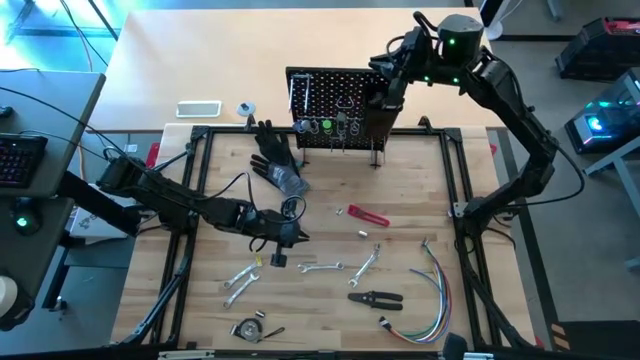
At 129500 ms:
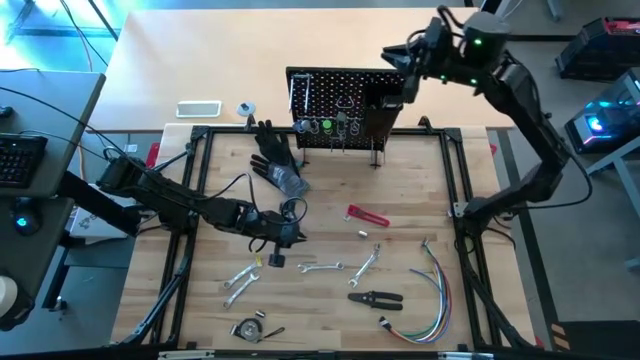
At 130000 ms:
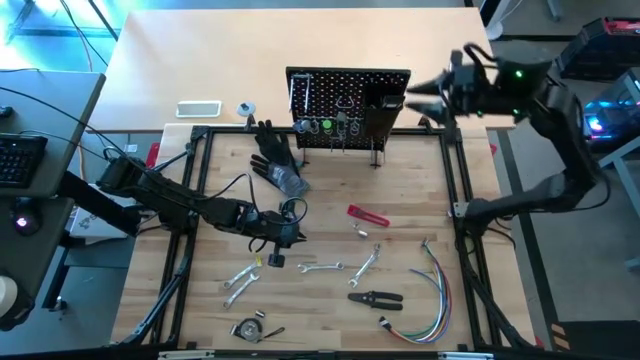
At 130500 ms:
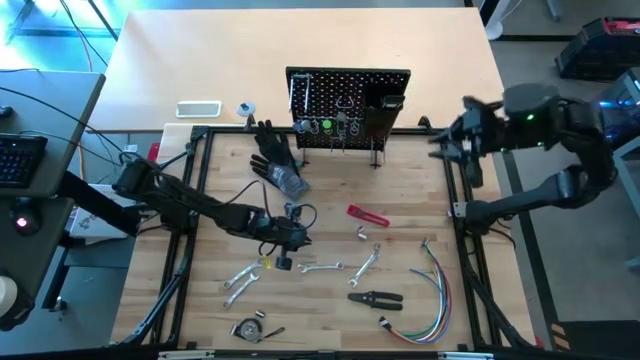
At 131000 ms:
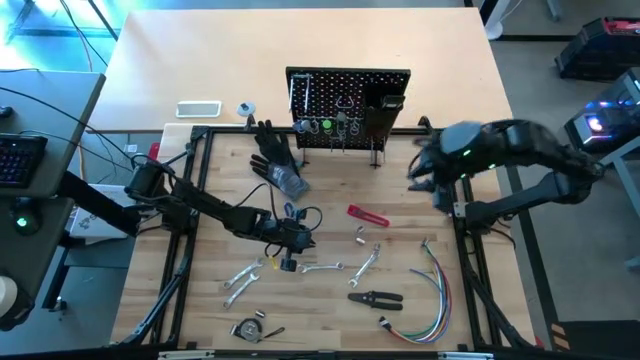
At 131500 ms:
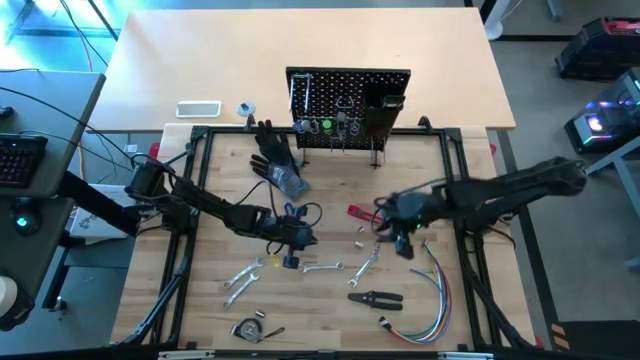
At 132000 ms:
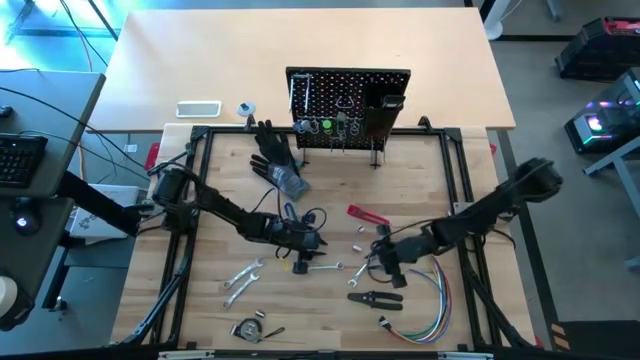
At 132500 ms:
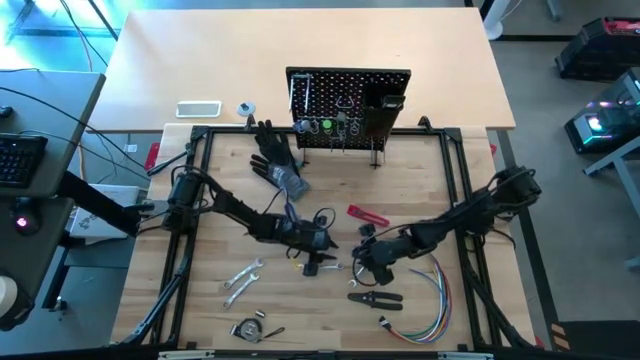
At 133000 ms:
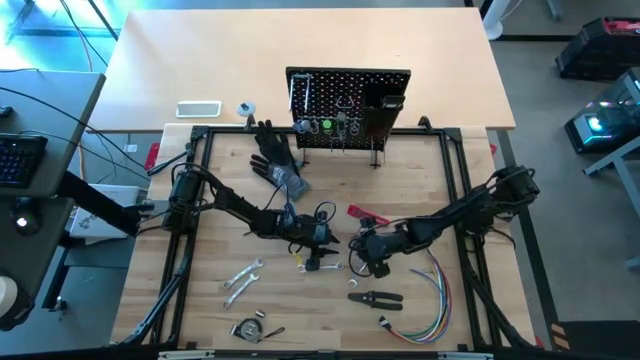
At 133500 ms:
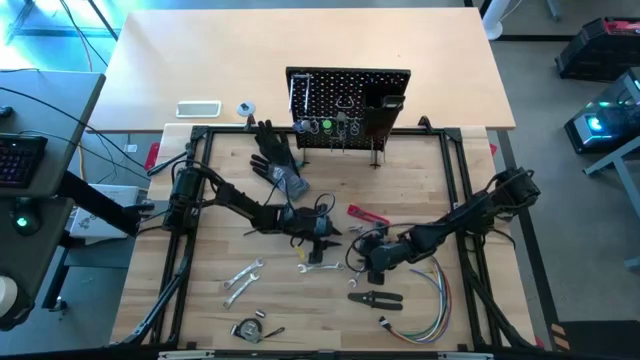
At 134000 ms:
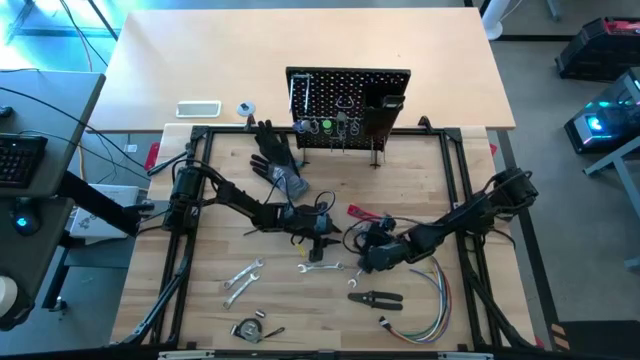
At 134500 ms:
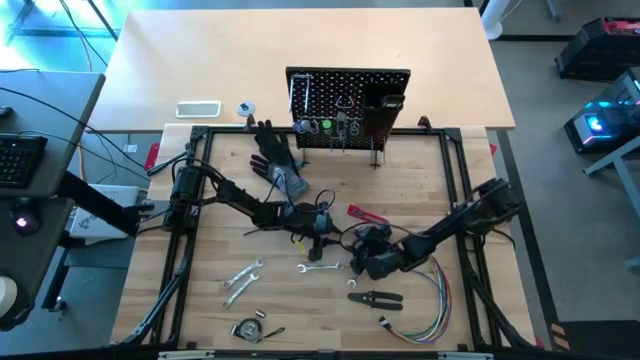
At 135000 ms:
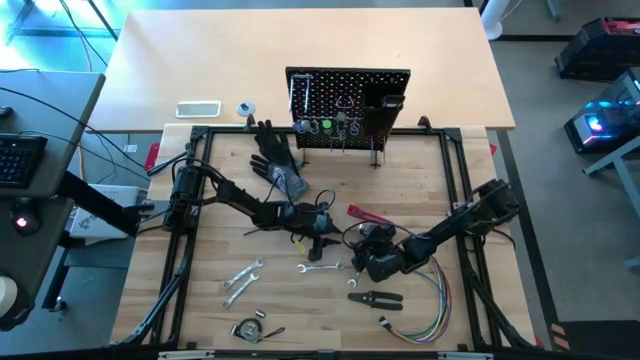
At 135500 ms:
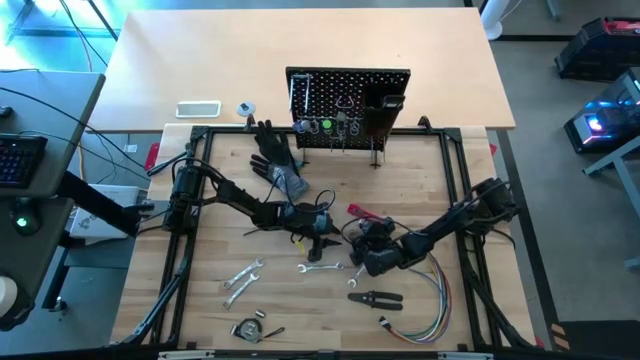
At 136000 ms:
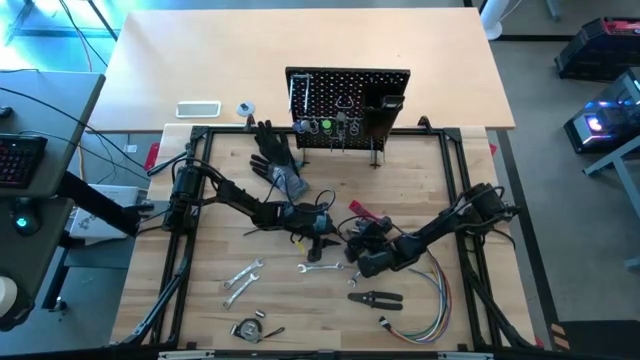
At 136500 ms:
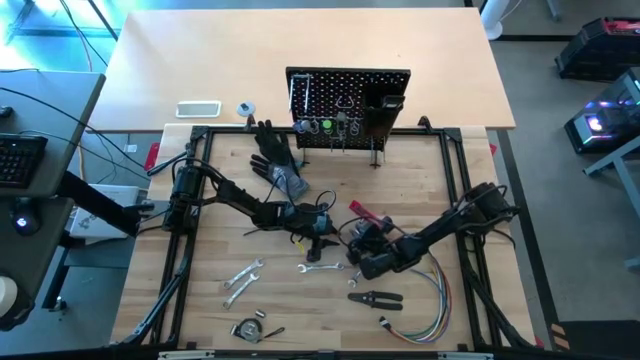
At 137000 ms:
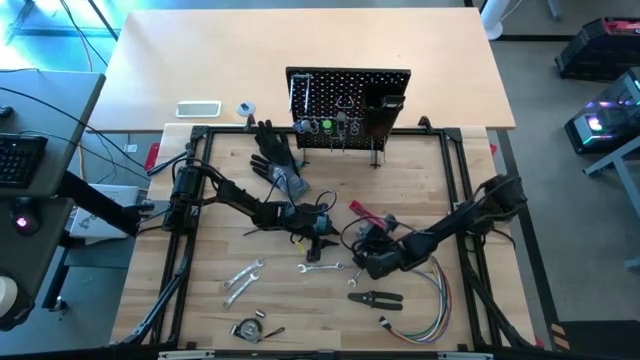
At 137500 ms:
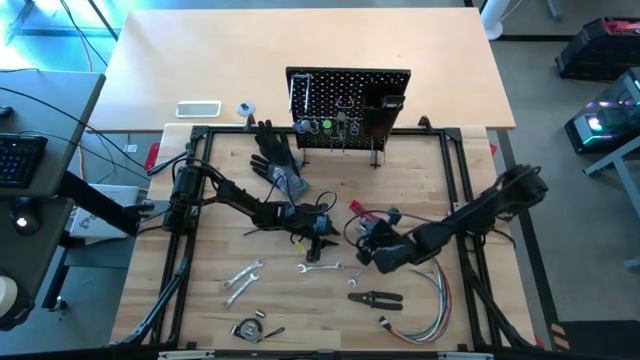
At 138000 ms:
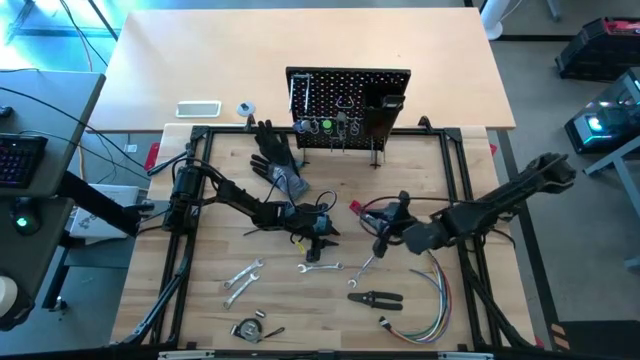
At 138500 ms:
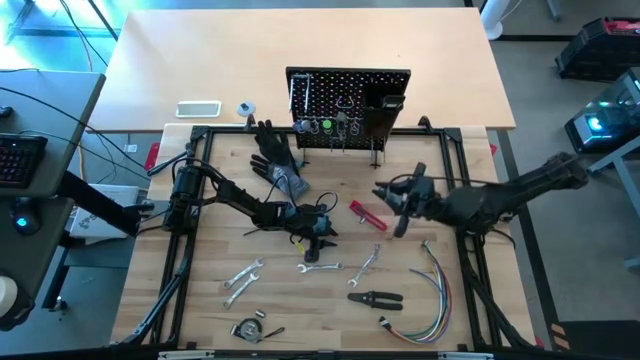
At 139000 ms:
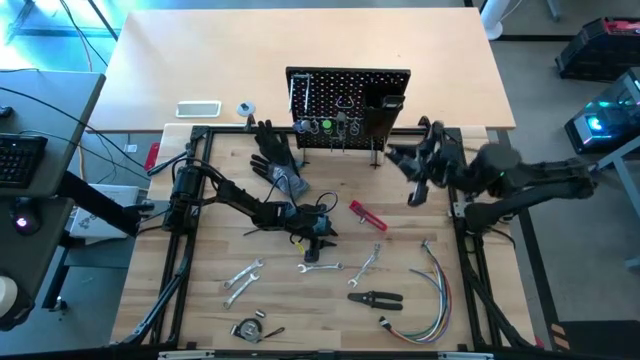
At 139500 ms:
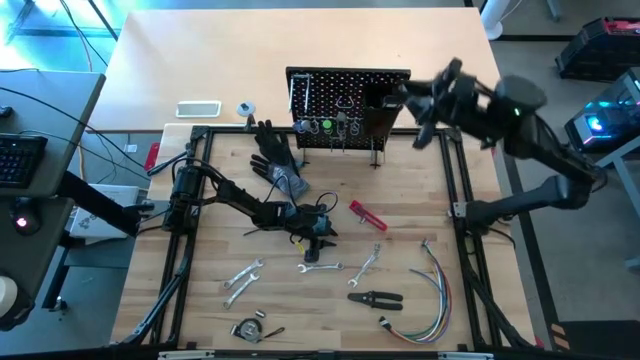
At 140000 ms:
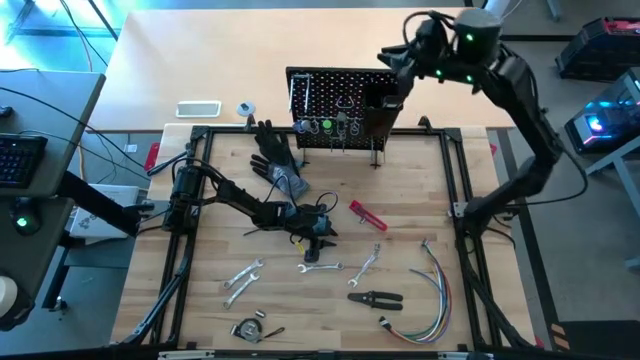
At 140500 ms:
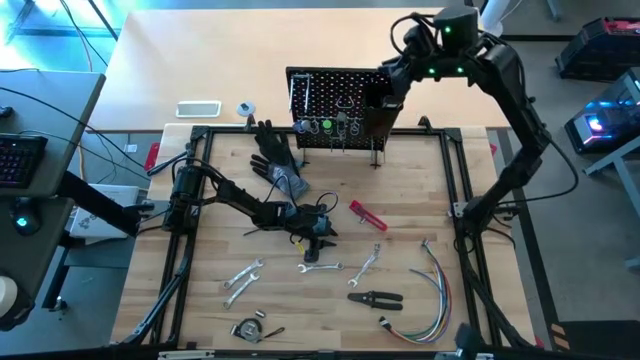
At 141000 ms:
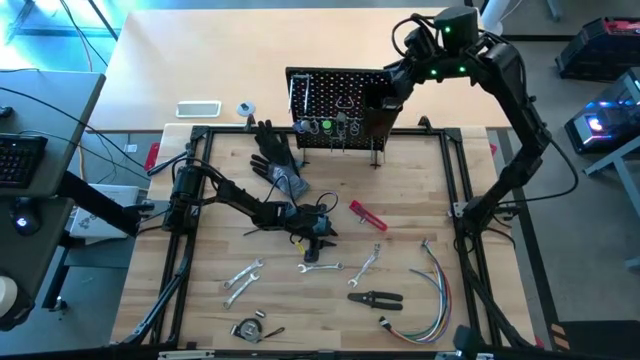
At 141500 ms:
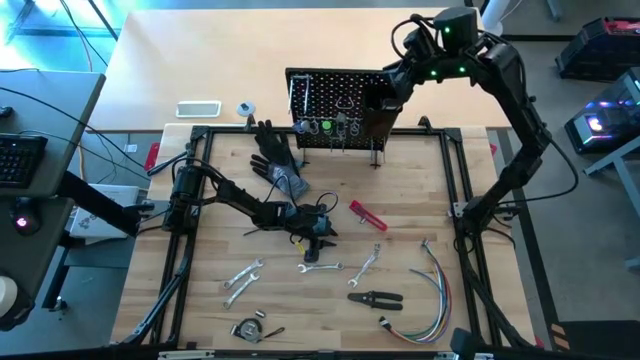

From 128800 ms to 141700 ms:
Task: Hang tools onto peg board
Put the silver socket into the black bin on the pegboard

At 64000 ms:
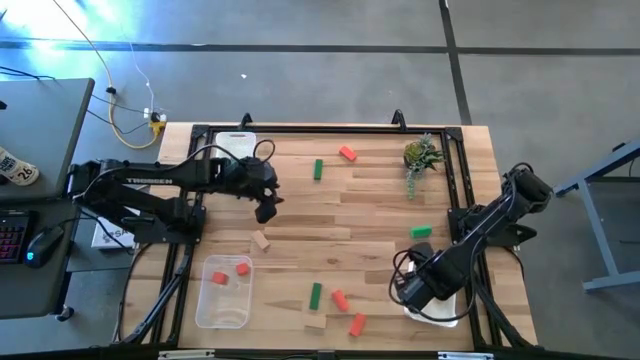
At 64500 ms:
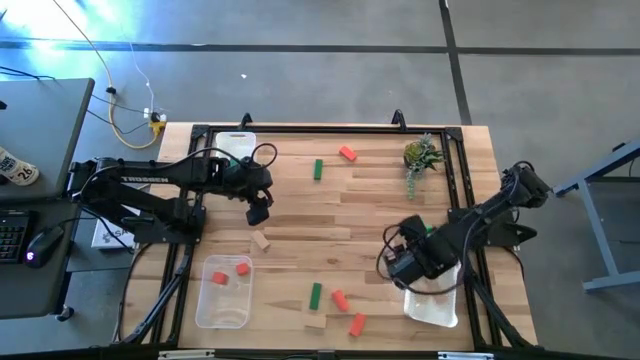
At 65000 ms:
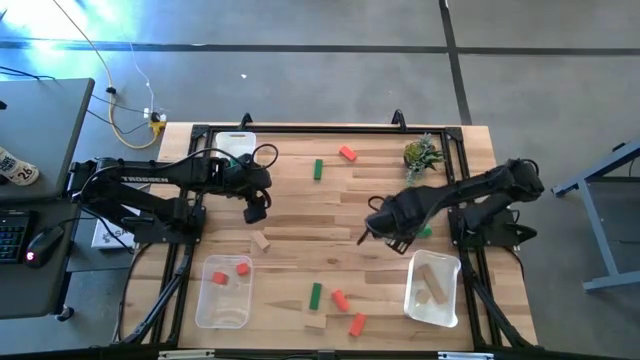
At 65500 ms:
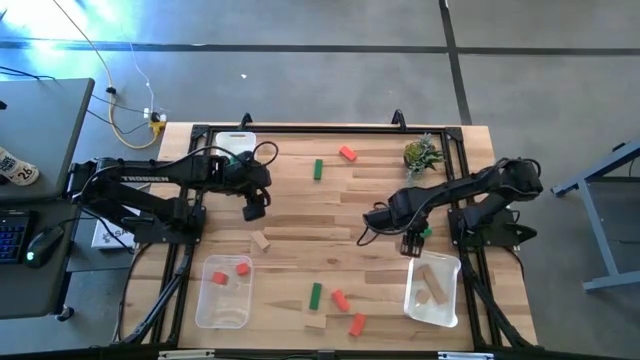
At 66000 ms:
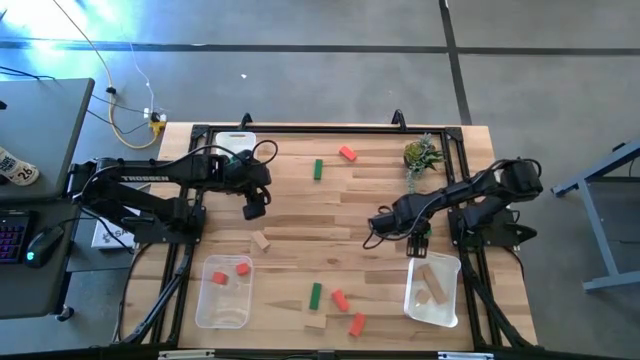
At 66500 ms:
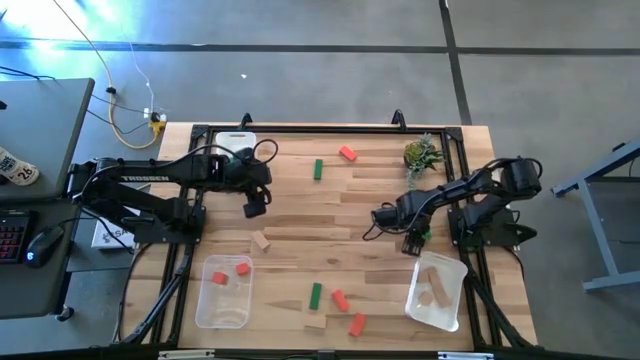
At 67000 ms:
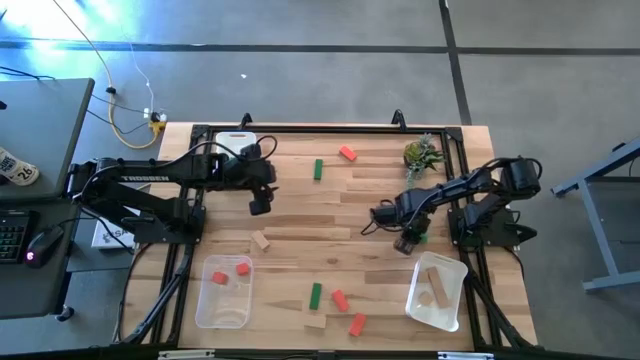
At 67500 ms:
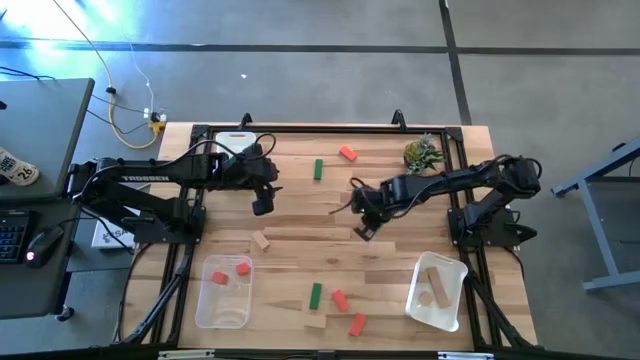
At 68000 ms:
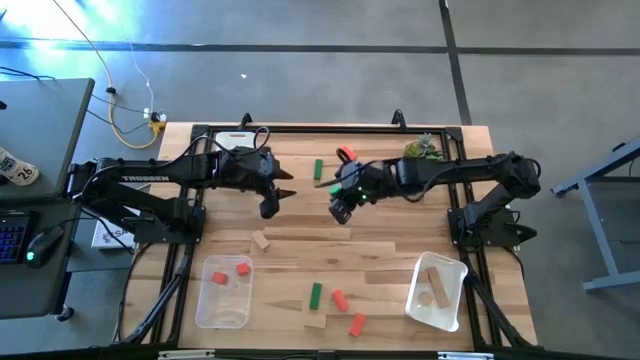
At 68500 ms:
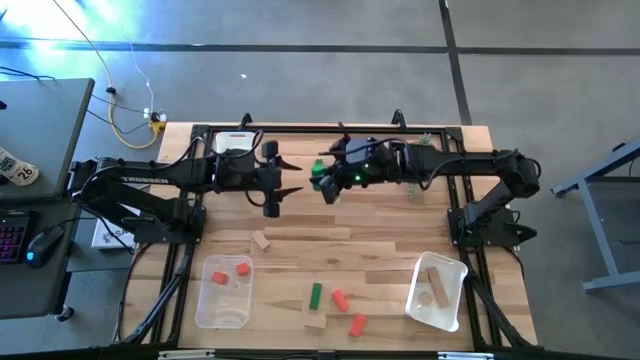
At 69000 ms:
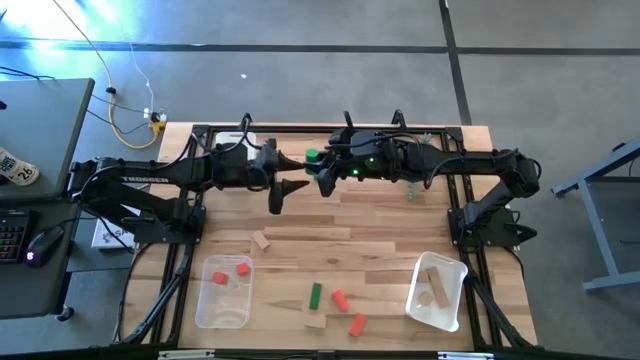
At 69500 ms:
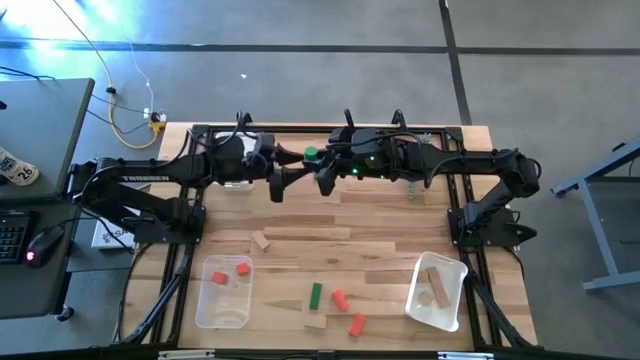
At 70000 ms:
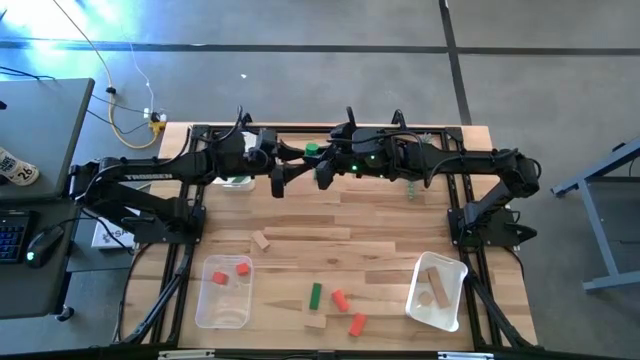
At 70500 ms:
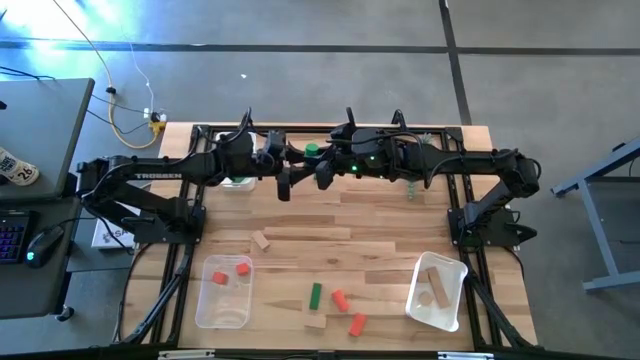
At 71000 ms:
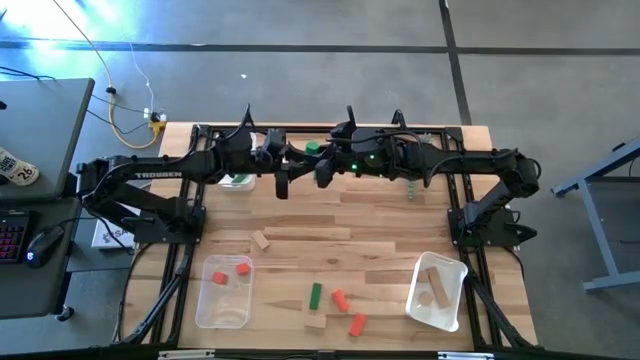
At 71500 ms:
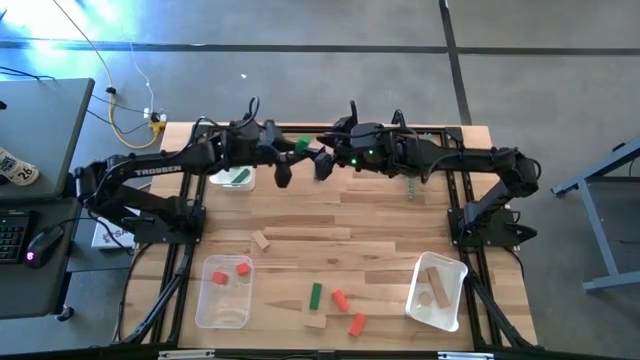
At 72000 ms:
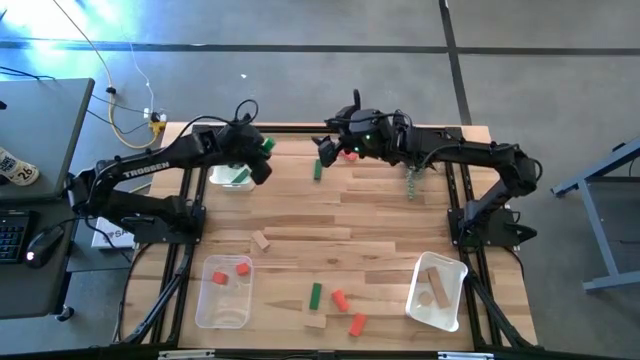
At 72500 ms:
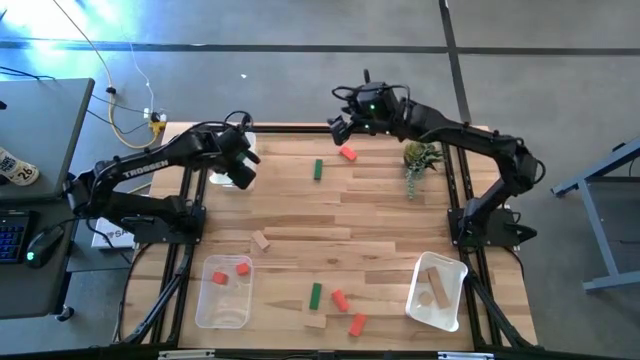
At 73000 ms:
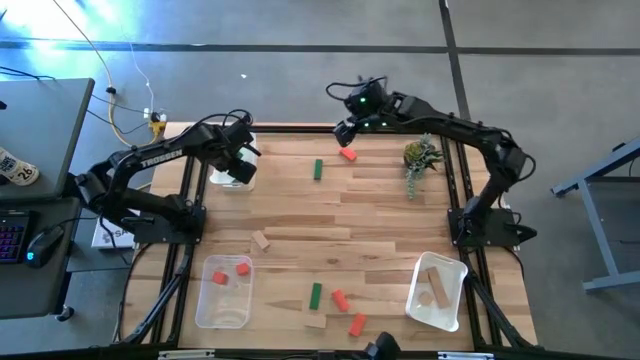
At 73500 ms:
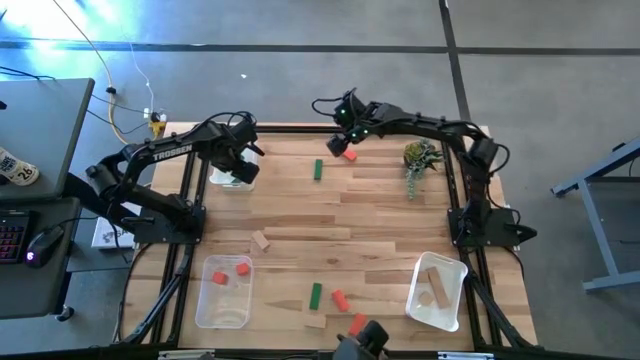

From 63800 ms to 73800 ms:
Task: Sort & place blocks by color
Put the green block into the top white bin
